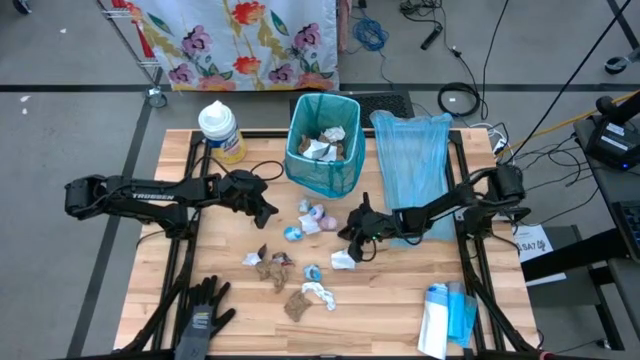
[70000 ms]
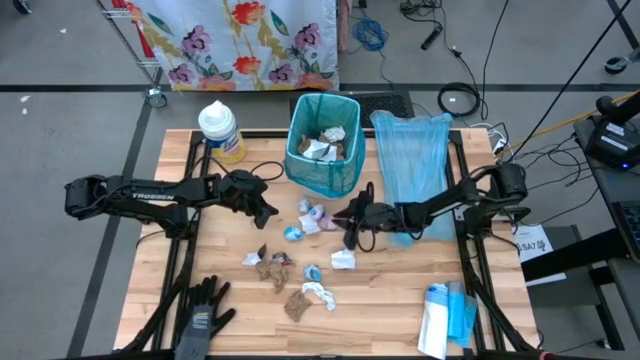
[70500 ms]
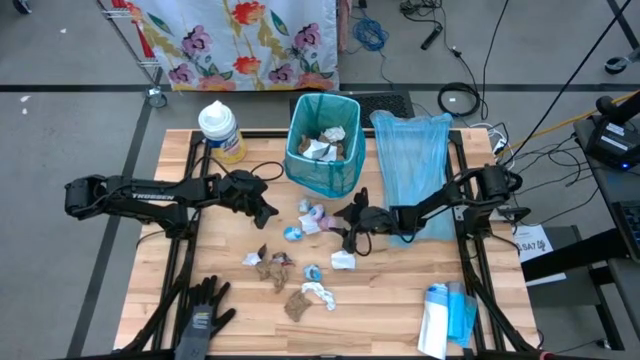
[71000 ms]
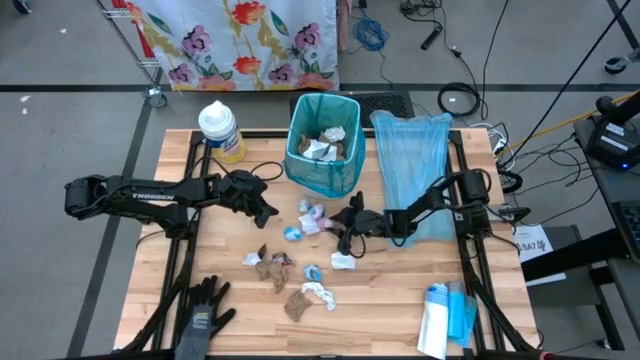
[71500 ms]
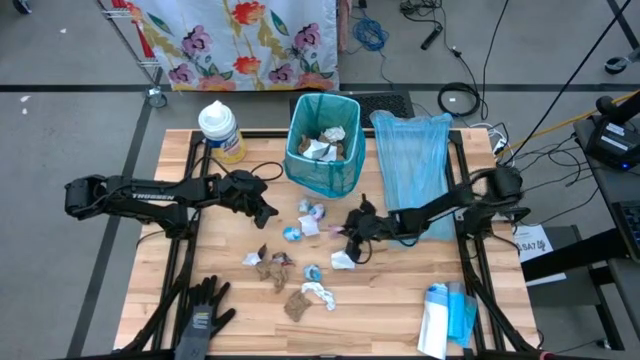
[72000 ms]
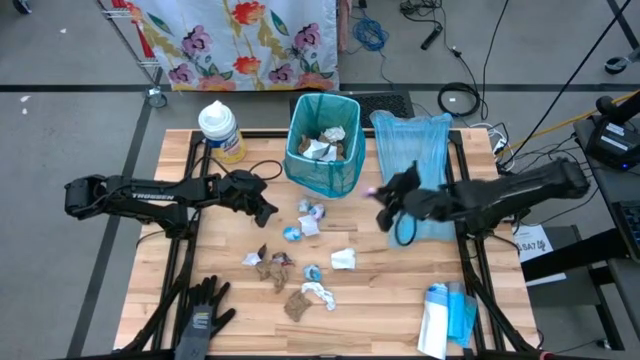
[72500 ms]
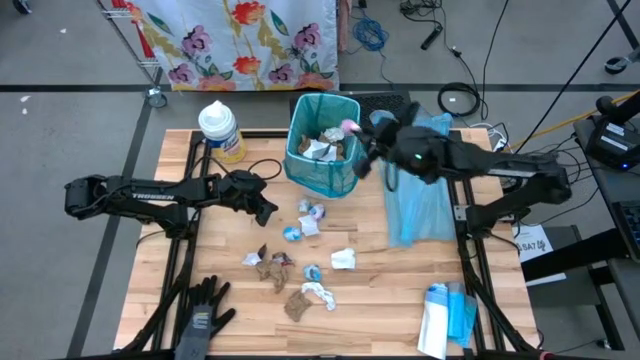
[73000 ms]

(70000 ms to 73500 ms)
Task: place trash/remove bag and relplace
Put the right pink plastic into the trash bin

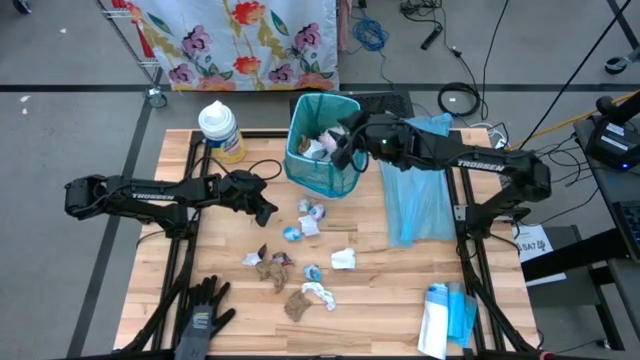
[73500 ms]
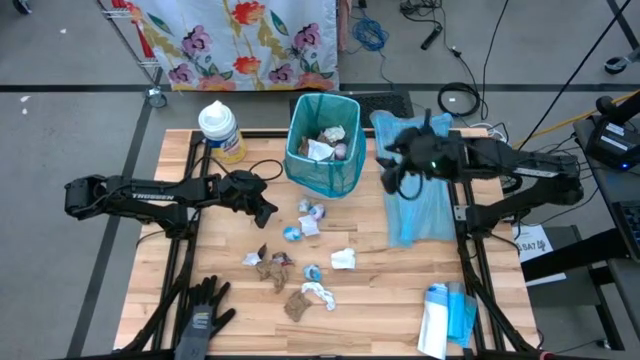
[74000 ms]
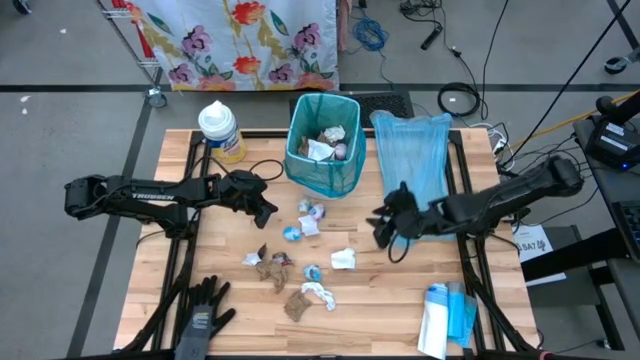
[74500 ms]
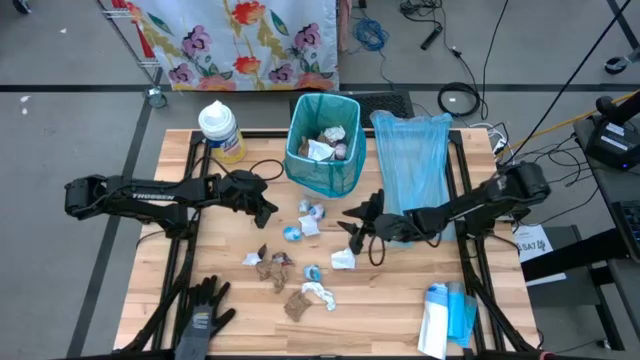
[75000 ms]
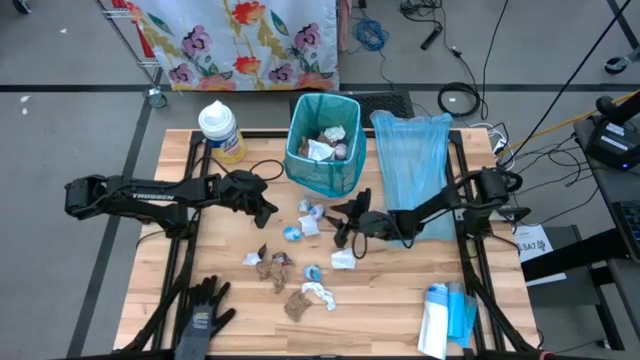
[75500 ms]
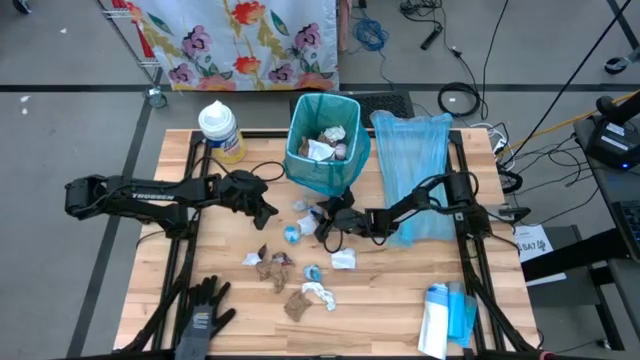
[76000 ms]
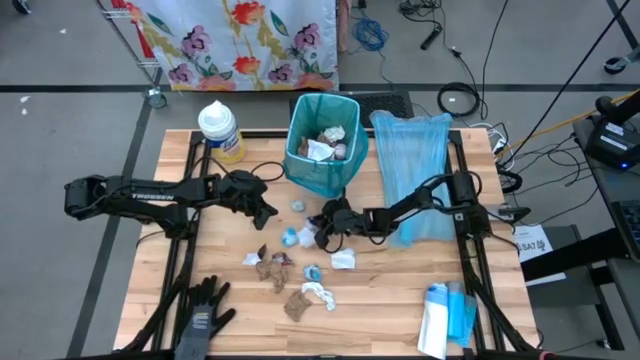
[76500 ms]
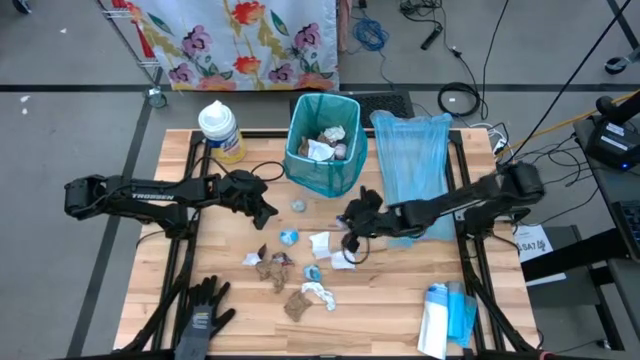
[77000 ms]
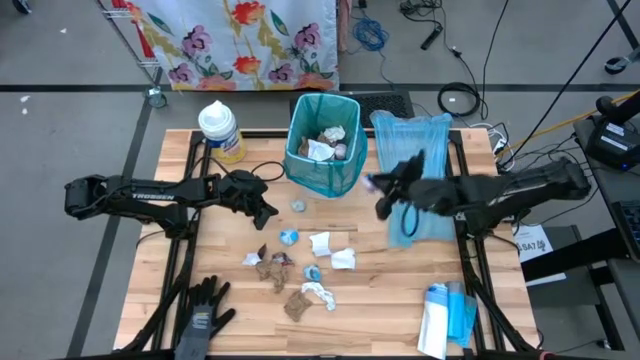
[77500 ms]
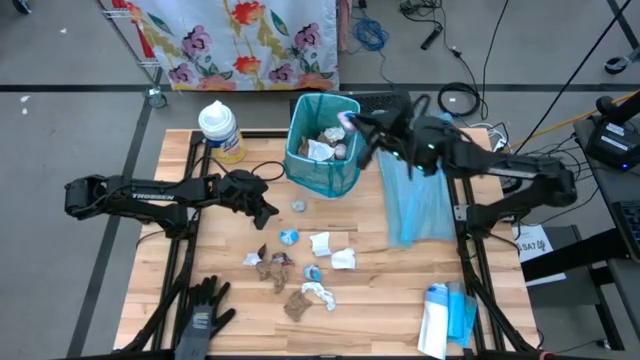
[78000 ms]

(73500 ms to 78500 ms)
Put the pink plastic into the trash bin

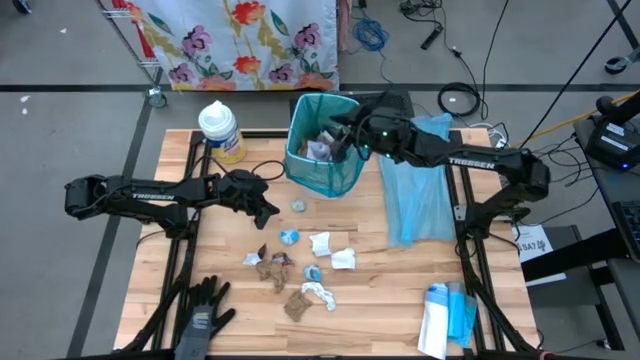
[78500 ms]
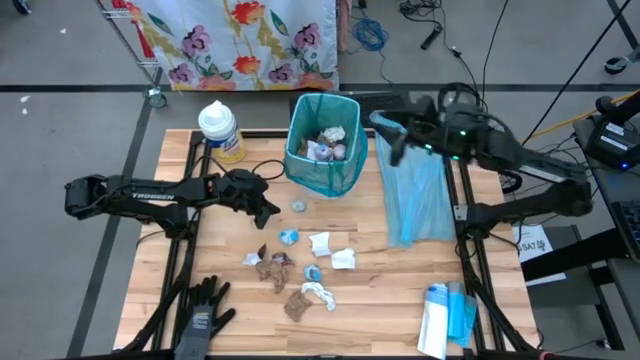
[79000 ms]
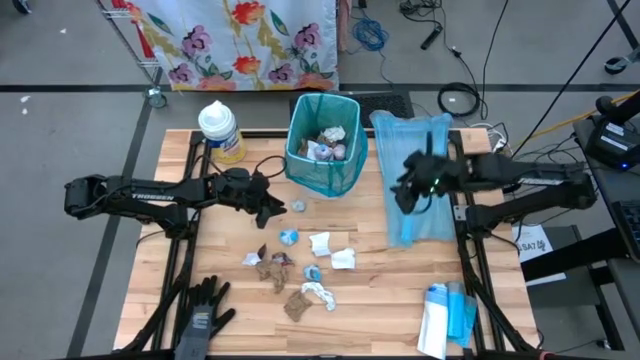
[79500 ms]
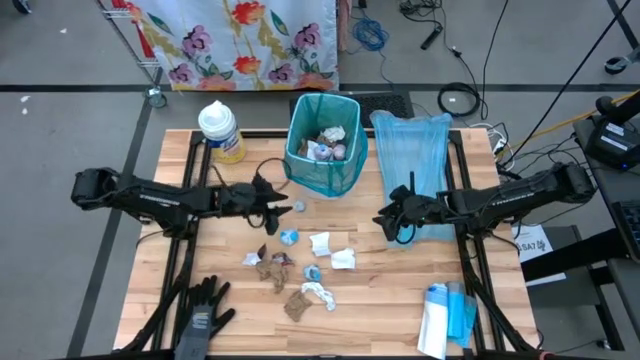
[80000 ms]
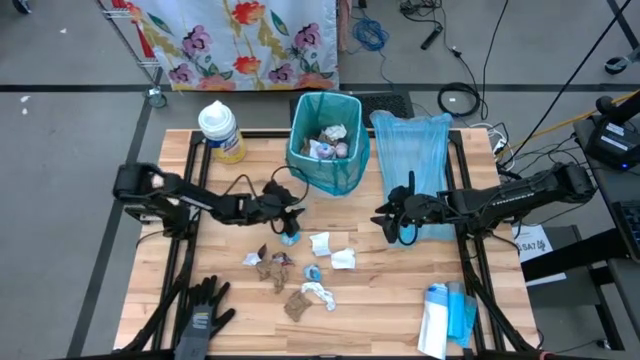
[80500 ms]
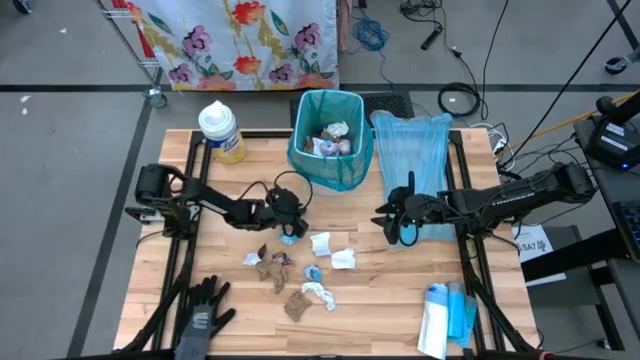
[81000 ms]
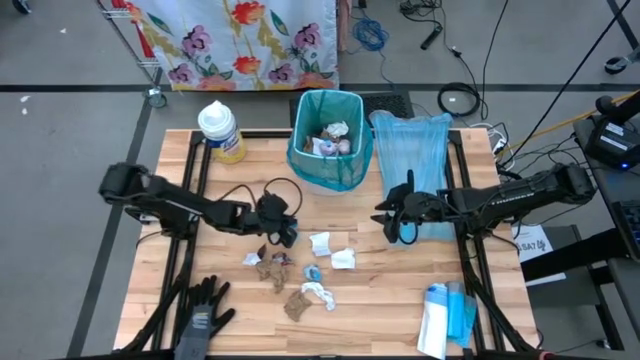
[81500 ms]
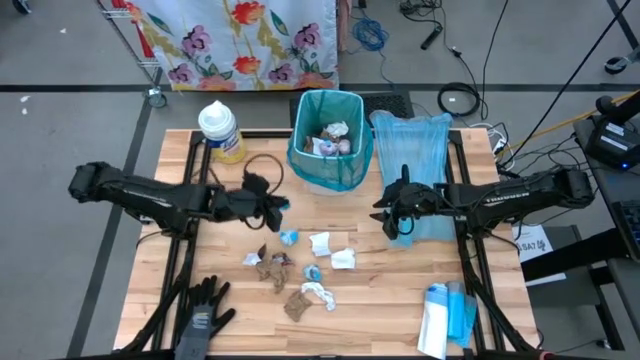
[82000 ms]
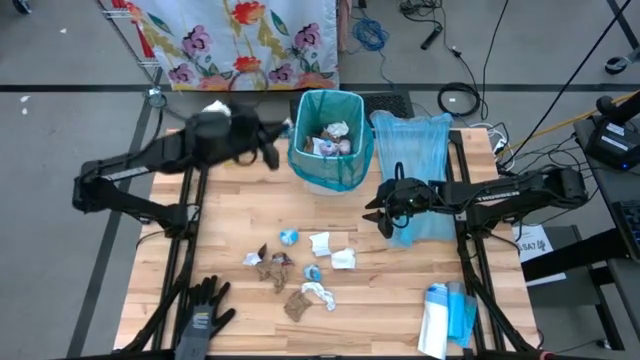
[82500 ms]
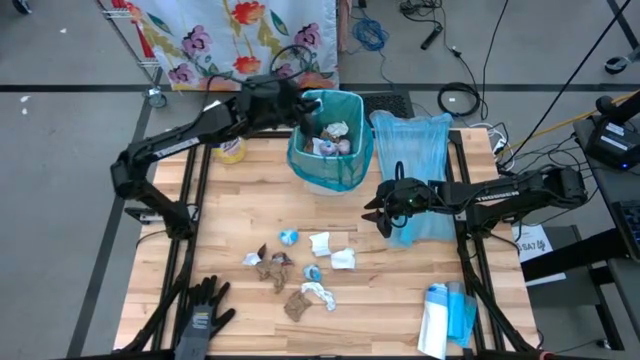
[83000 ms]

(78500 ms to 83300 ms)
Put the white plastic into the trash bin

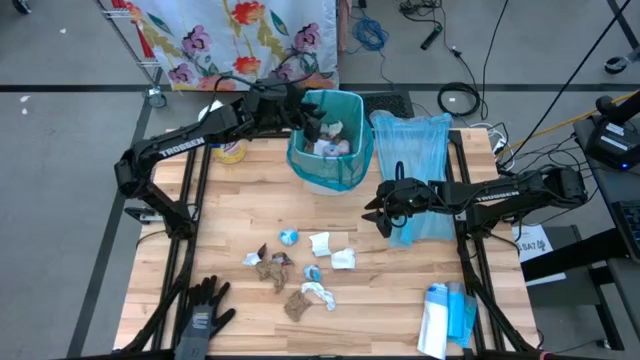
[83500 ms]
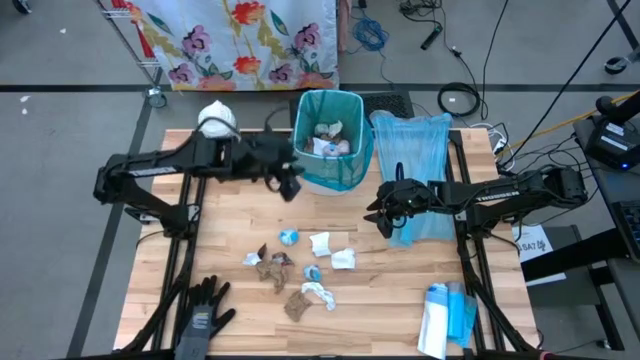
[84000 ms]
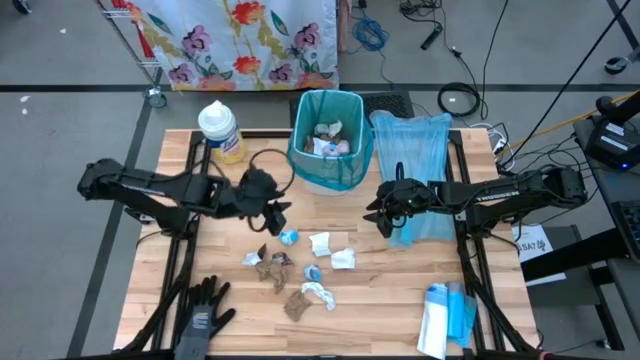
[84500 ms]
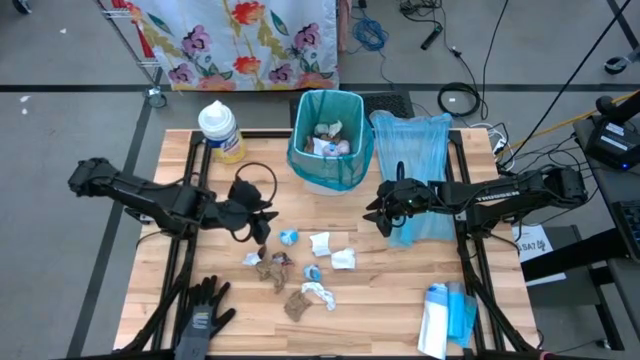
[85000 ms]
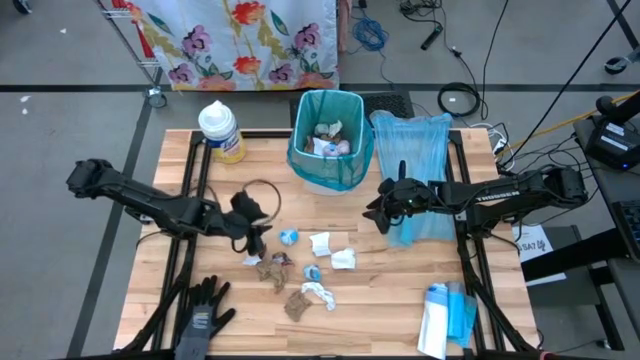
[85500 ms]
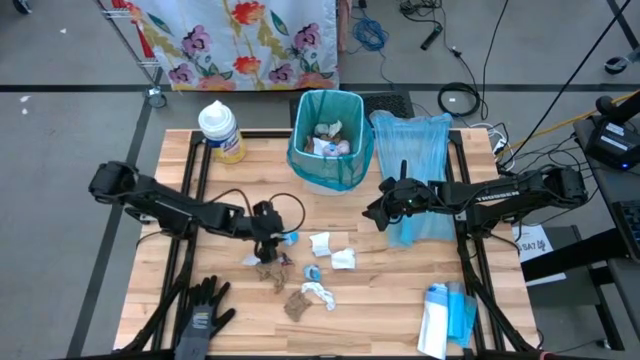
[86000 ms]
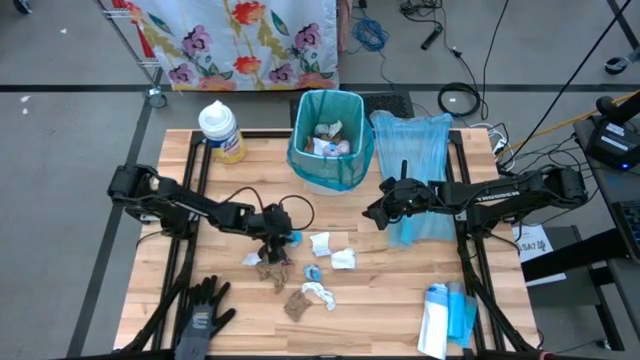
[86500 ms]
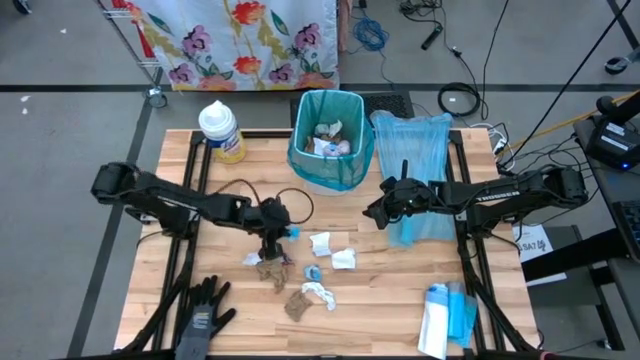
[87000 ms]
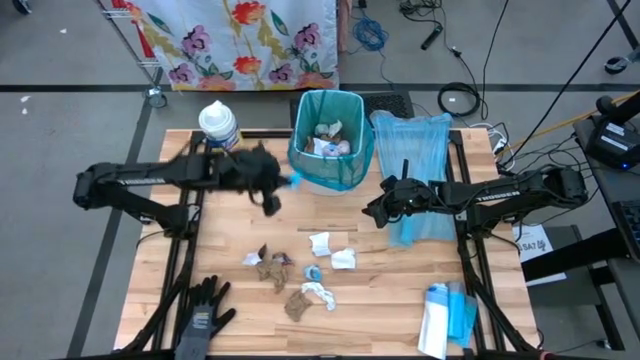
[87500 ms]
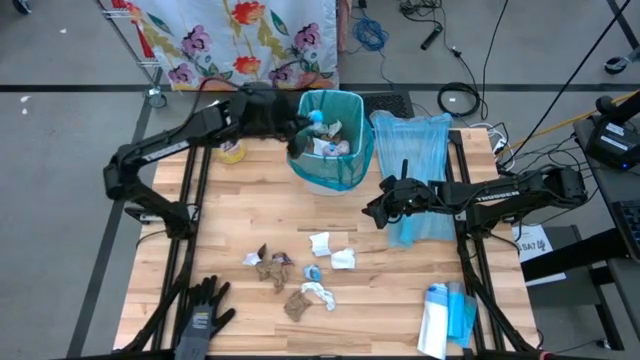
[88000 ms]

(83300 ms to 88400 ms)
Put the top blue plastic into the trash bin

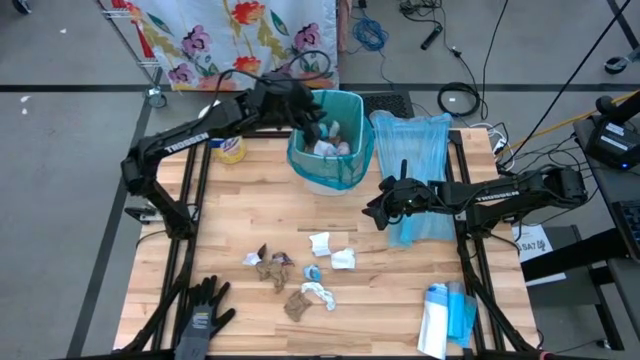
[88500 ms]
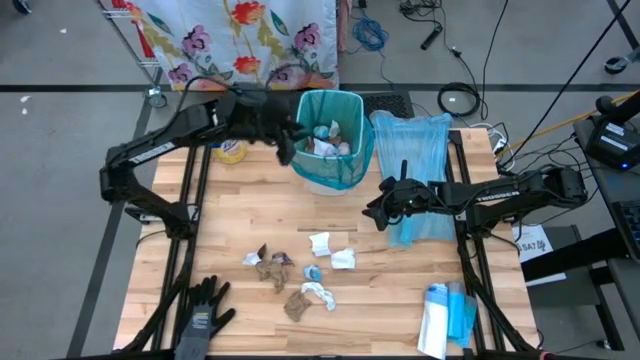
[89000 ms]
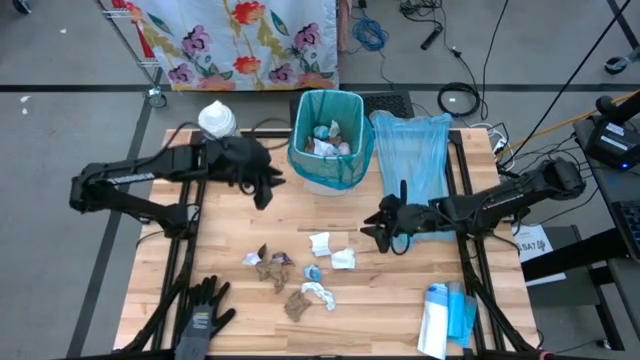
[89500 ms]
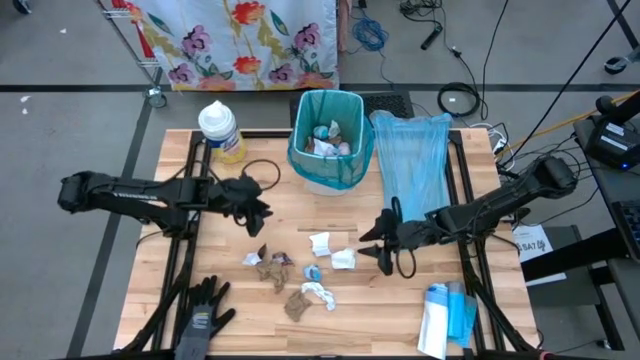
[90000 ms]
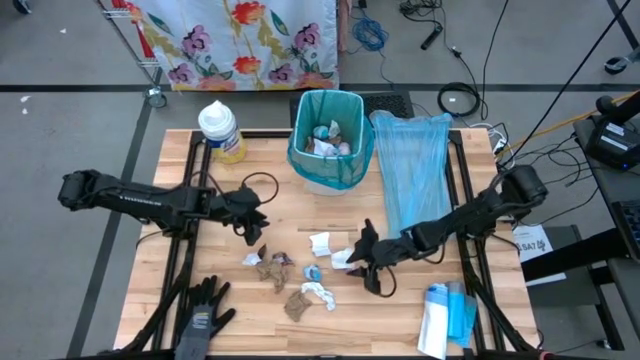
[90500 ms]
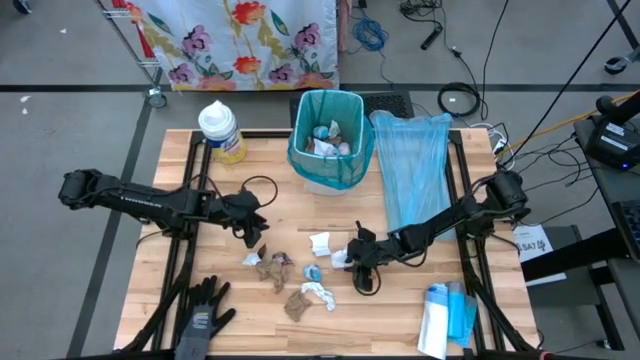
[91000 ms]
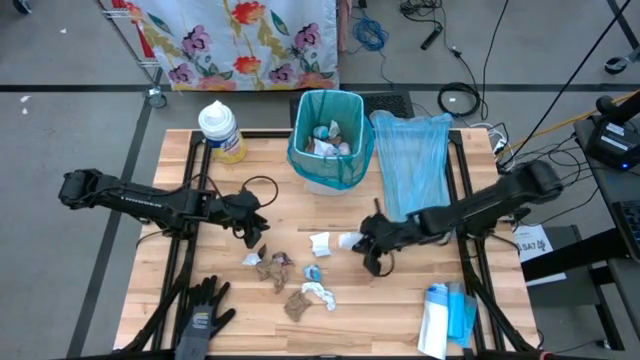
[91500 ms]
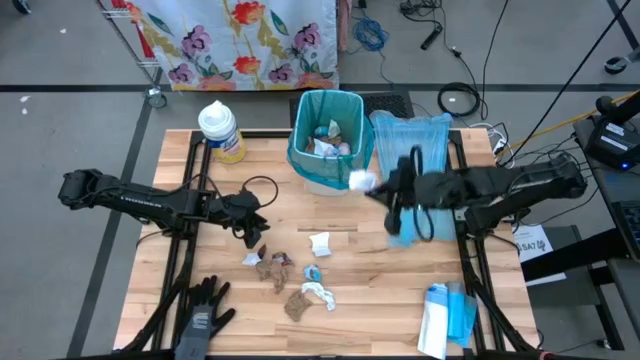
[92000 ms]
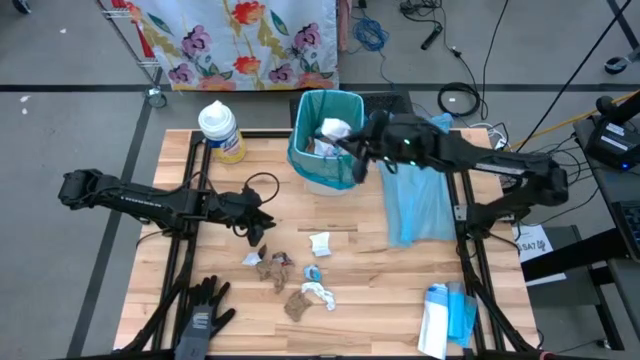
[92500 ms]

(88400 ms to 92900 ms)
Put the right white paper piece into the trash bin
